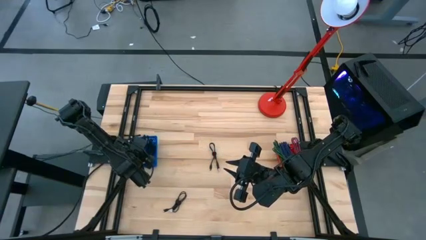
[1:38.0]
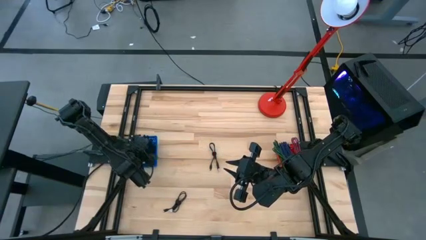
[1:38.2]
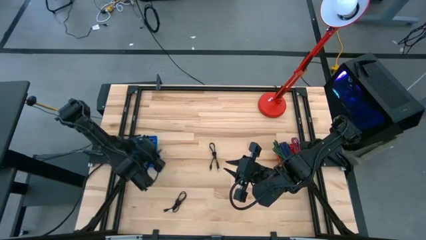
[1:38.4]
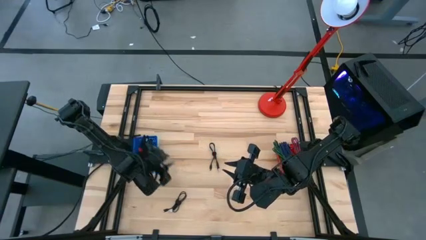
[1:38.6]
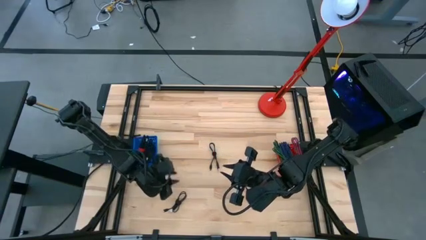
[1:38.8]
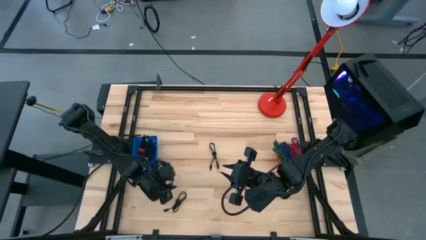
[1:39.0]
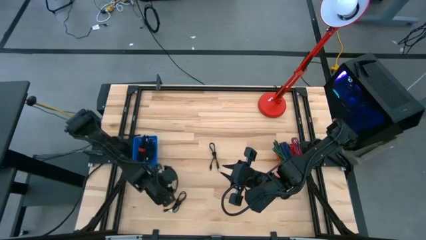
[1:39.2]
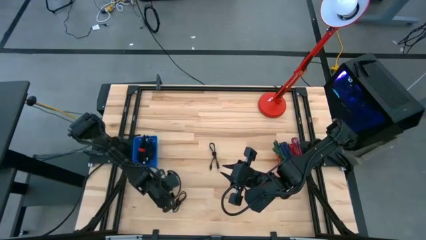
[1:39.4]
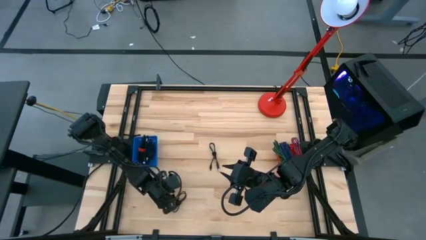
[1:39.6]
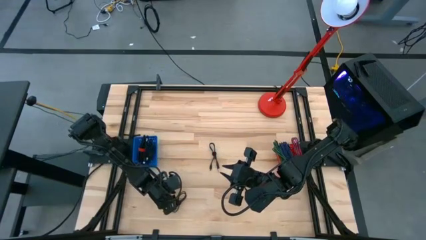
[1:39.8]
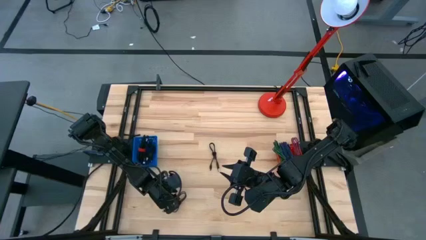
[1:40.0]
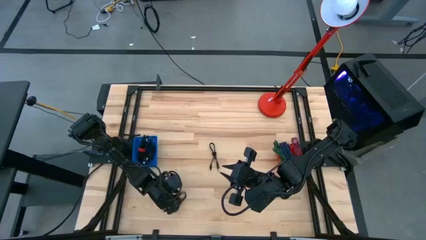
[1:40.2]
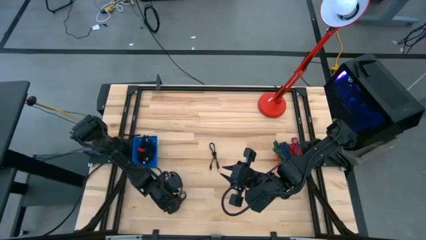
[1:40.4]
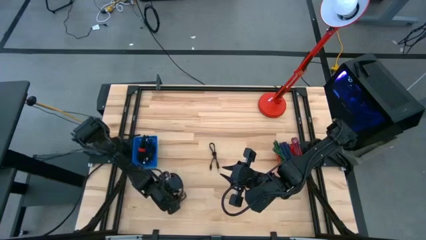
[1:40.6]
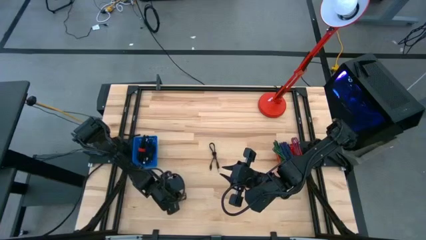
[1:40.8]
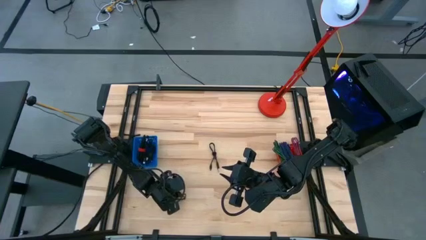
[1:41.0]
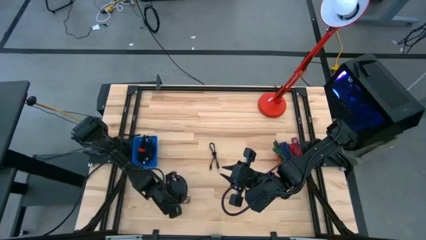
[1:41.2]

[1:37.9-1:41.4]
Task: Pick & Place USB Port
Put the black charger cable into the blue basket

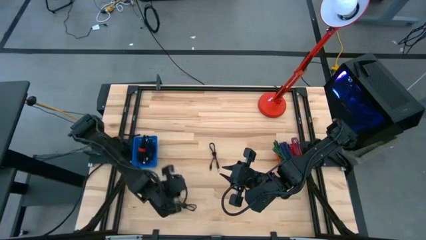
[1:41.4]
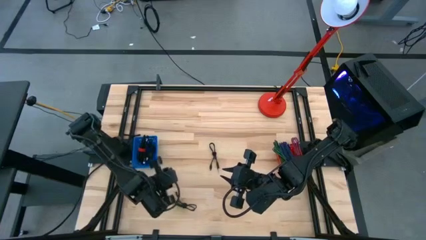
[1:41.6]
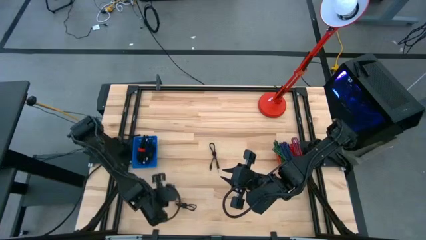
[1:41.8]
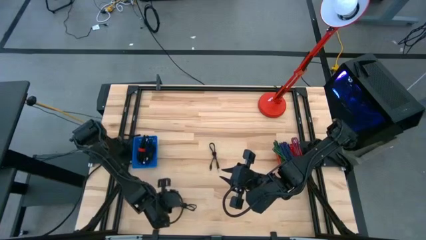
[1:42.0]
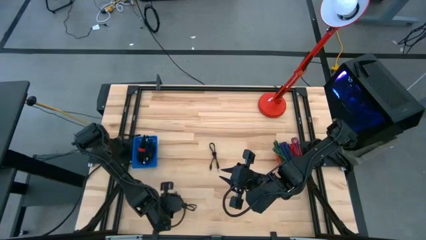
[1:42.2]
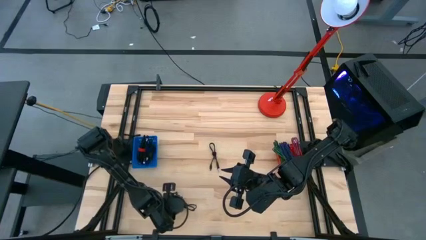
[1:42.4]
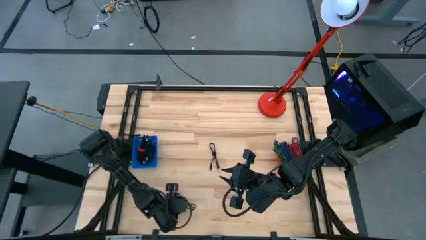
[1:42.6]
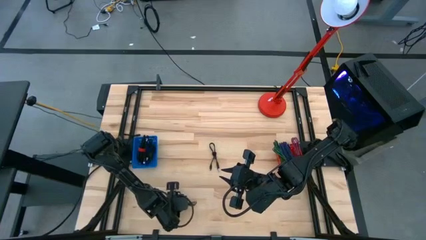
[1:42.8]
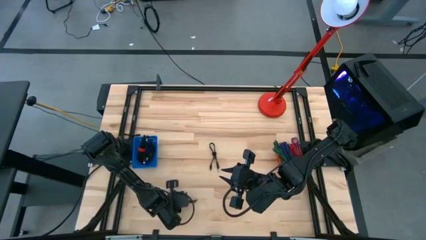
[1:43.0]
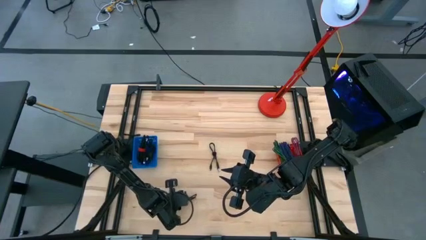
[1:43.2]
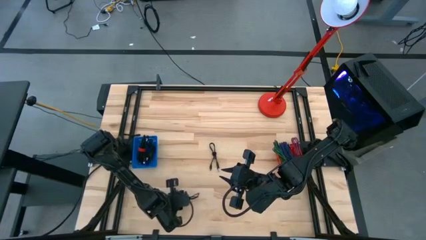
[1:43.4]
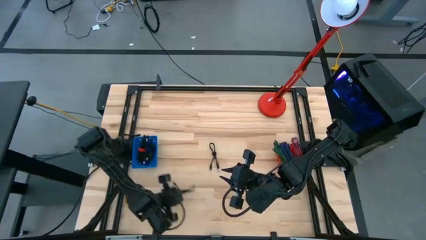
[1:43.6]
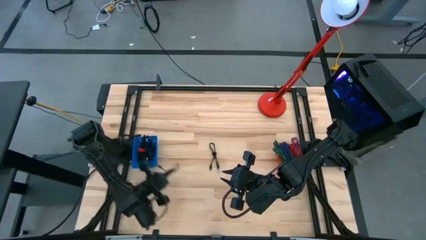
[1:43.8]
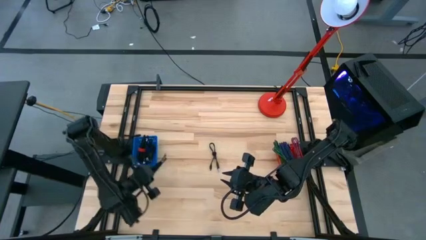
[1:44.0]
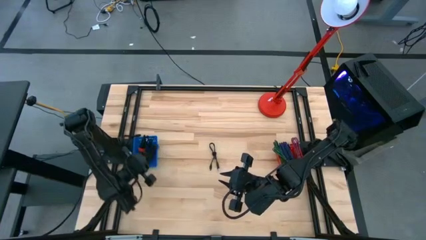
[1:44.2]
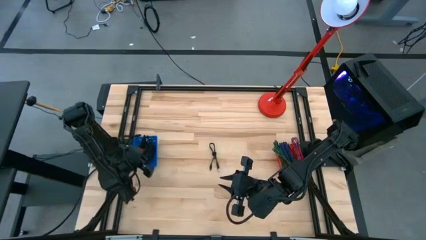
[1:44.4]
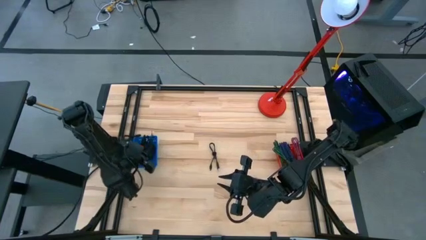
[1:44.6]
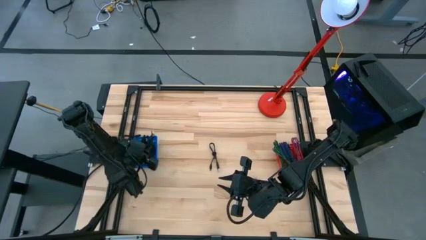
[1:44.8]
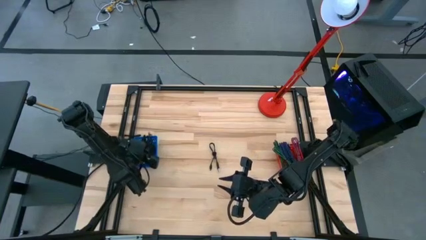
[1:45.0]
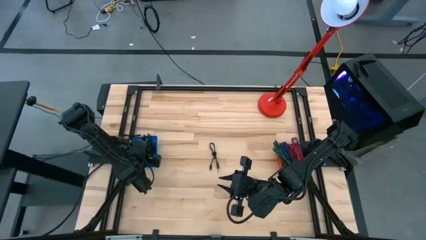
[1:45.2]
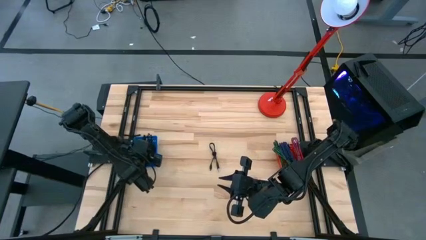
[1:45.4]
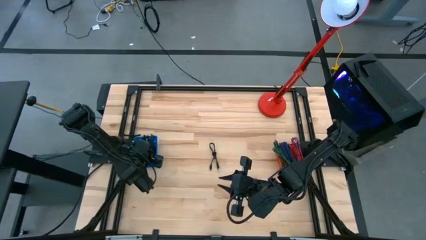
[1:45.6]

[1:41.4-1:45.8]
Put the black charger cable into the blue basket

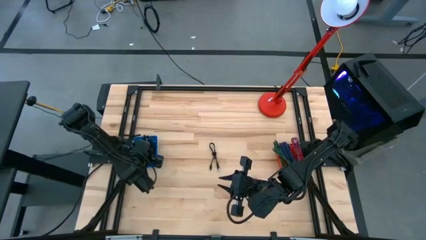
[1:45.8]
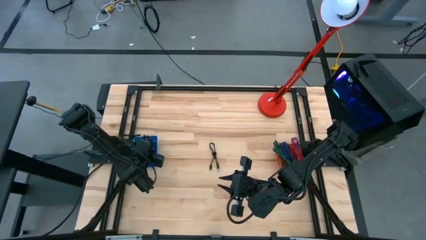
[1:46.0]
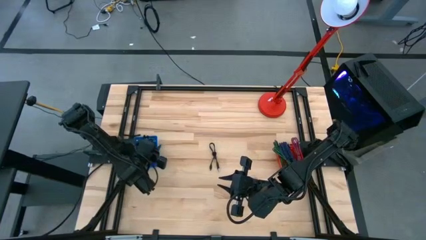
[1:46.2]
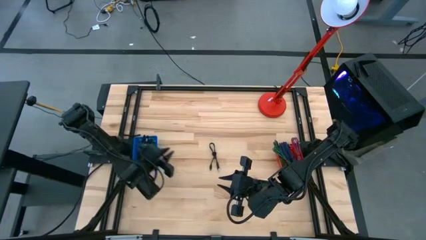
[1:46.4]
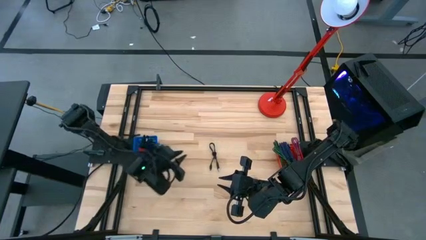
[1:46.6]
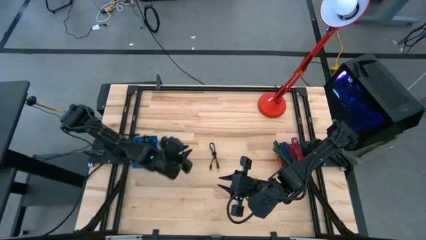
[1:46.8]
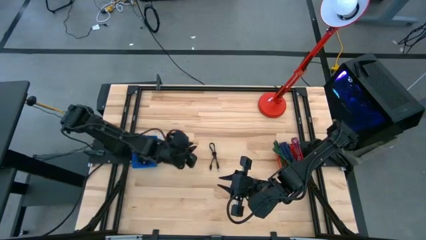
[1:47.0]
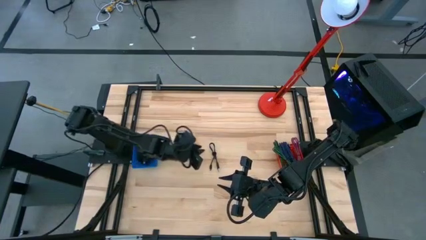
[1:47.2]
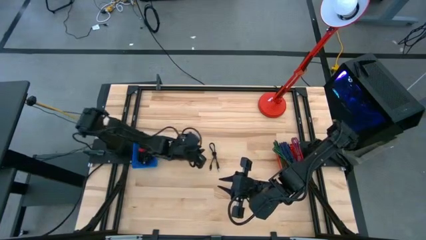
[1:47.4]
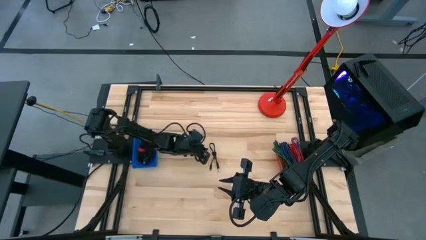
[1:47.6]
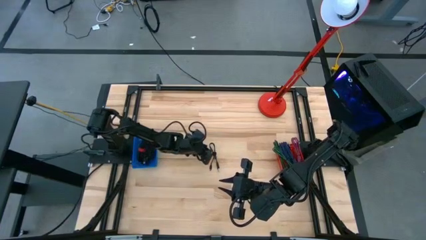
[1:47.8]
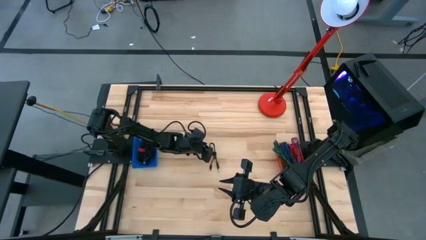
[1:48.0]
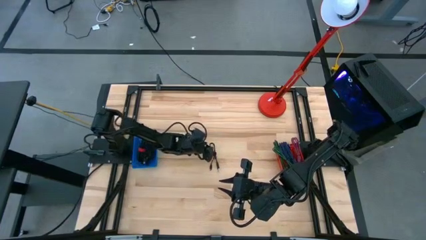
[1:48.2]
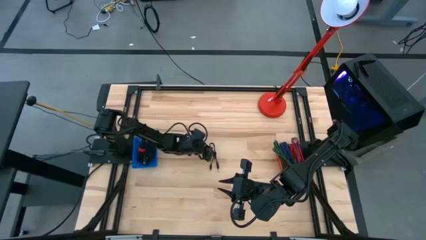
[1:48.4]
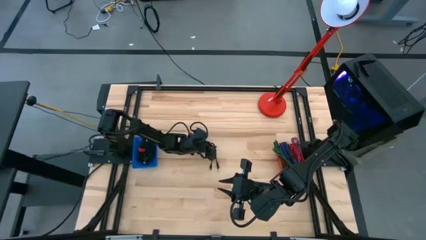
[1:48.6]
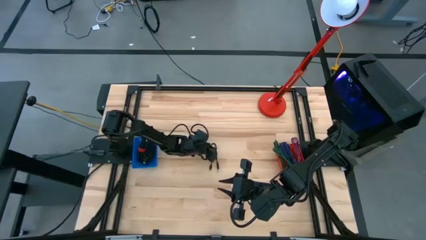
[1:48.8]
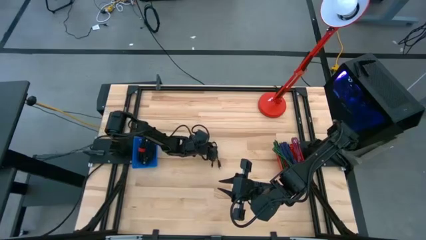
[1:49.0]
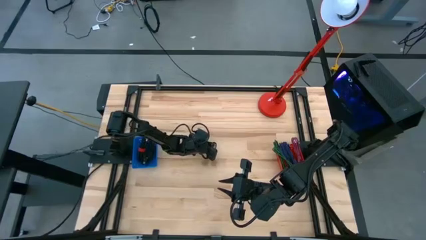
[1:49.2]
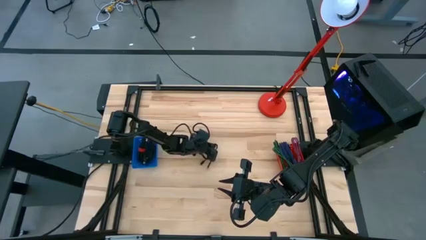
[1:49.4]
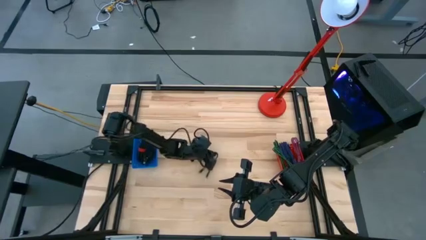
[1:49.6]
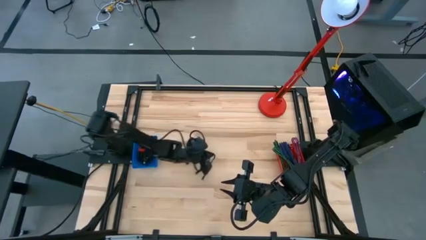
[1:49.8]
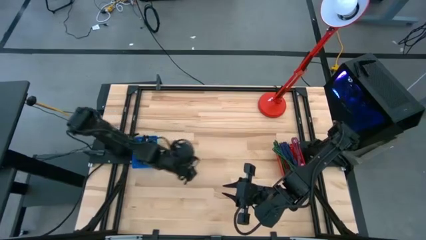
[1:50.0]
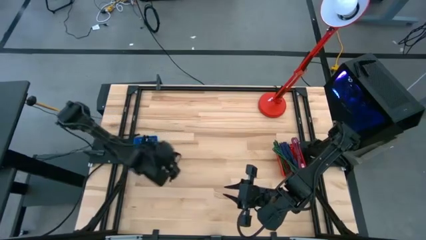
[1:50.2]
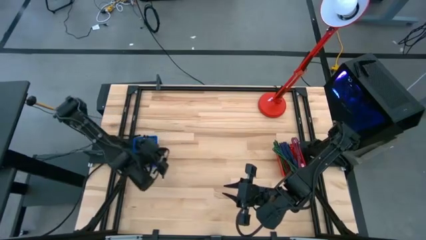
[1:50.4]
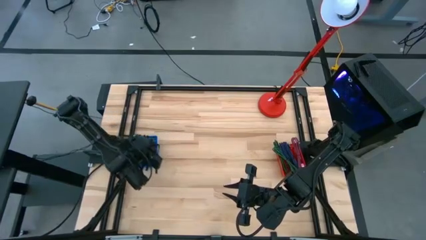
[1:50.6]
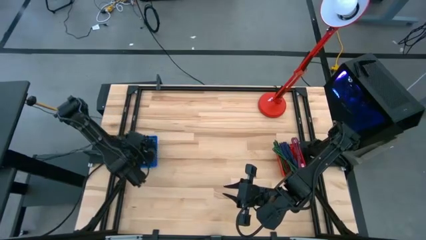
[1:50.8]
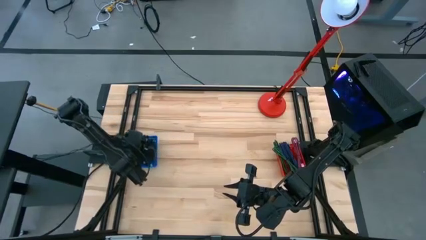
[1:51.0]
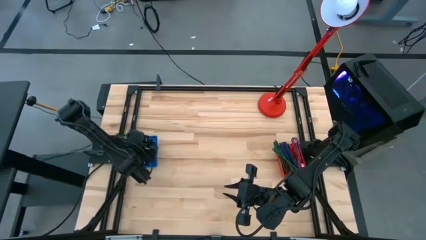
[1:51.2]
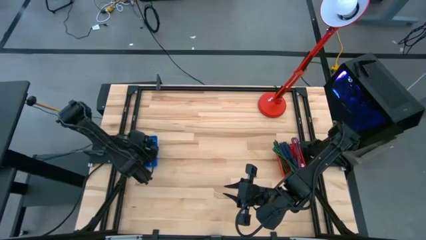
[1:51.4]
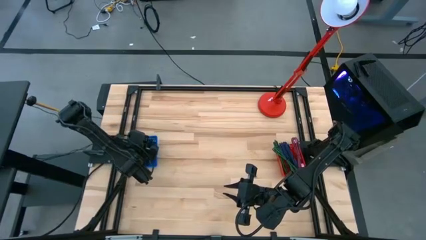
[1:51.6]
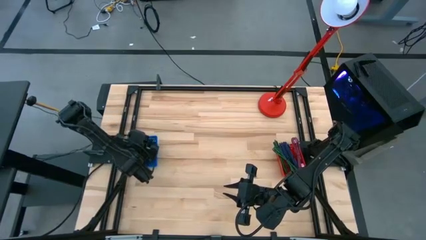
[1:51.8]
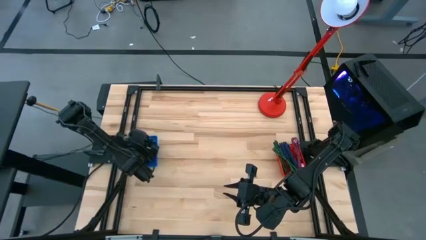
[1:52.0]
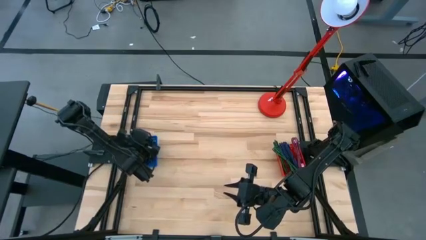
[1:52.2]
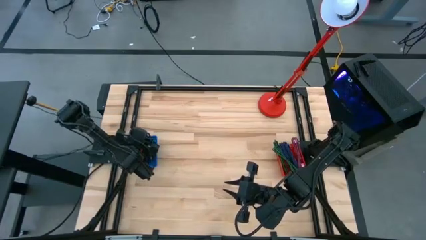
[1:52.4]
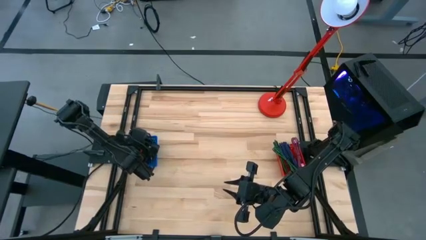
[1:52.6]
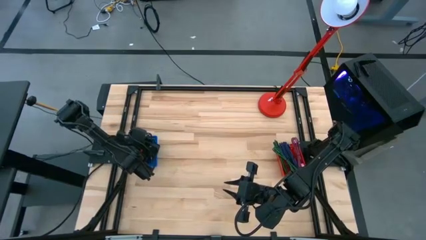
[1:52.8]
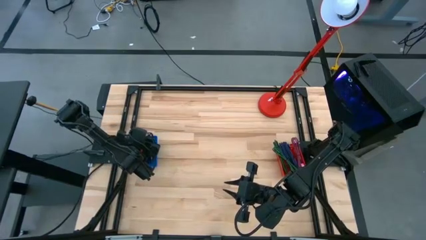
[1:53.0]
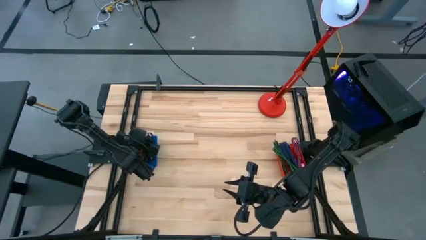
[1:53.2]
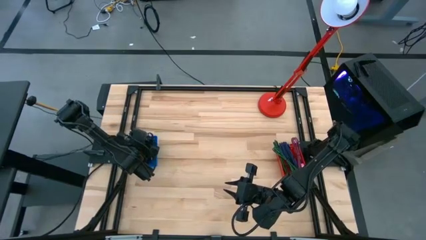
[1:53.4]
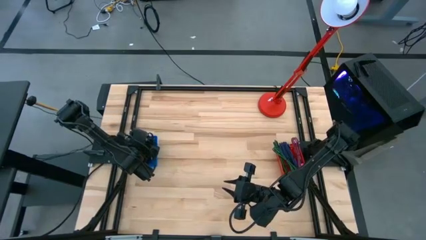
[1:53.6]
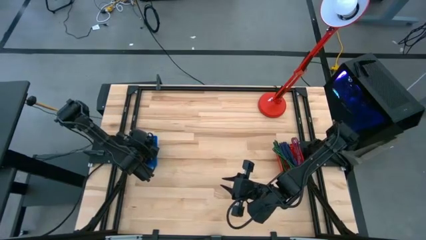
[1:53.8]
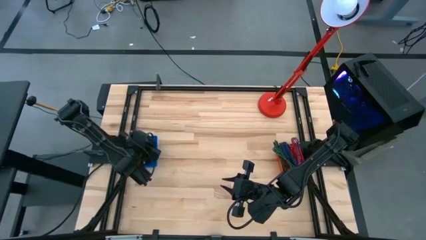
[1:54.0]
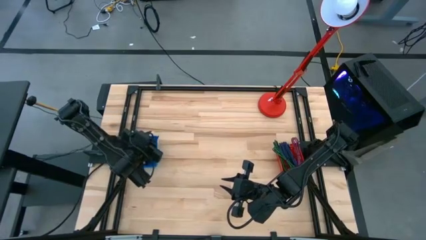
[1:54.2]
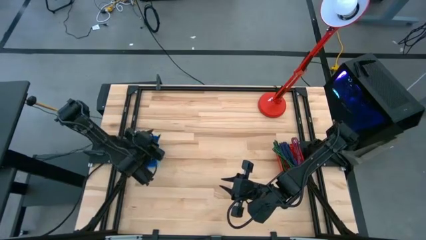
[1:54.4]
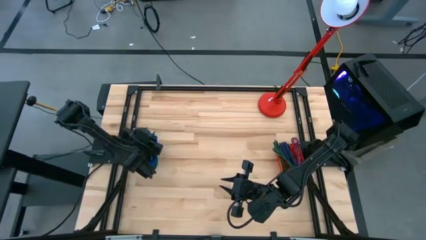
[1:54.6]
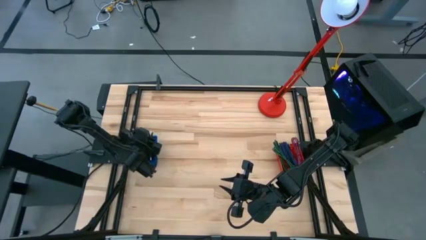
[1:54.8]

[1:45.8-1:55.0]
Put the black charger cable into the blue basket
